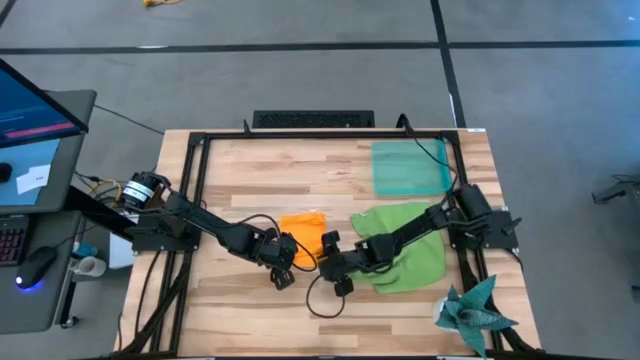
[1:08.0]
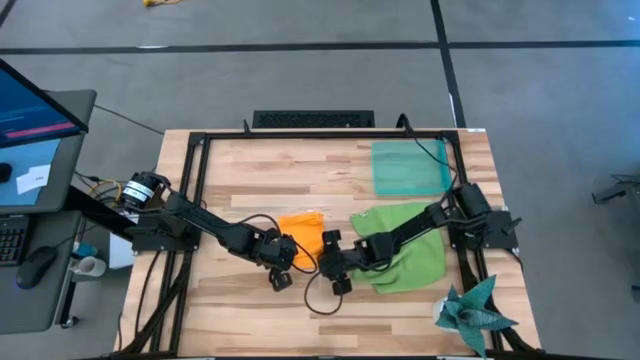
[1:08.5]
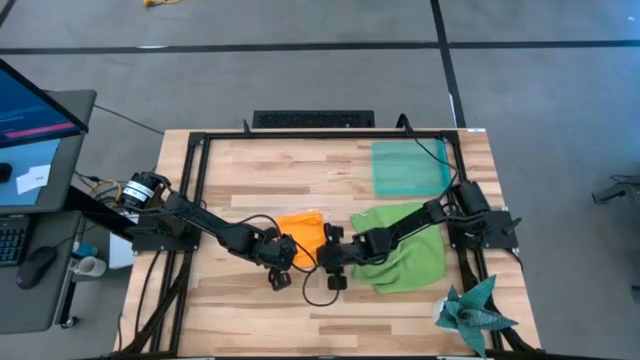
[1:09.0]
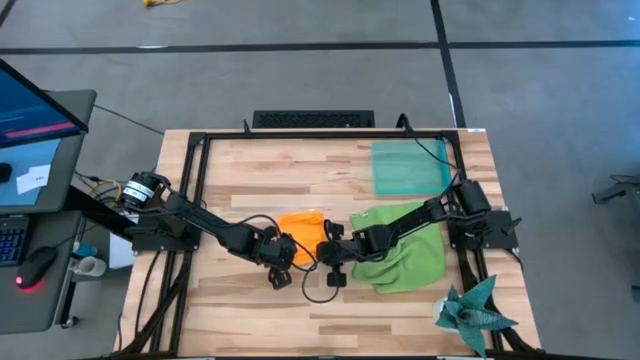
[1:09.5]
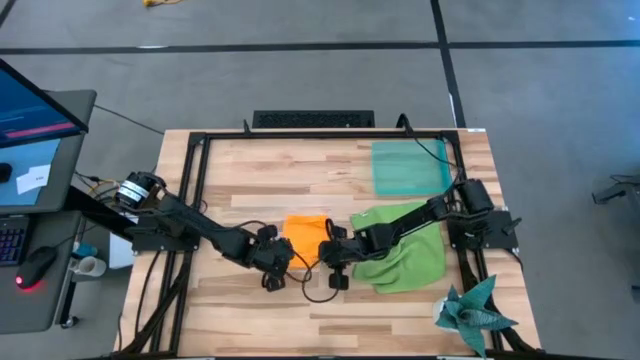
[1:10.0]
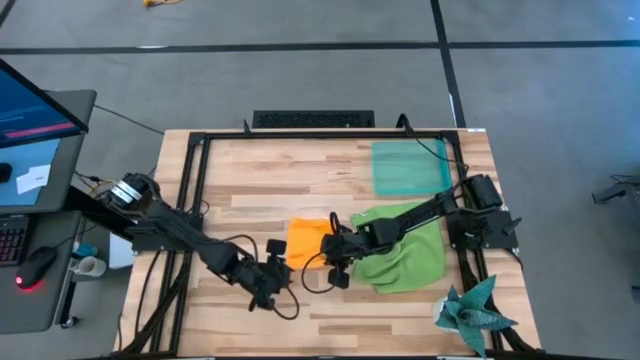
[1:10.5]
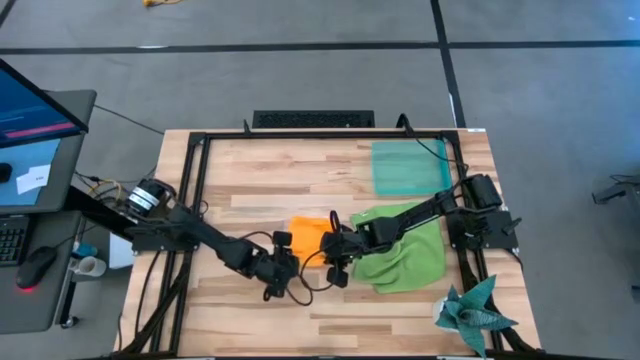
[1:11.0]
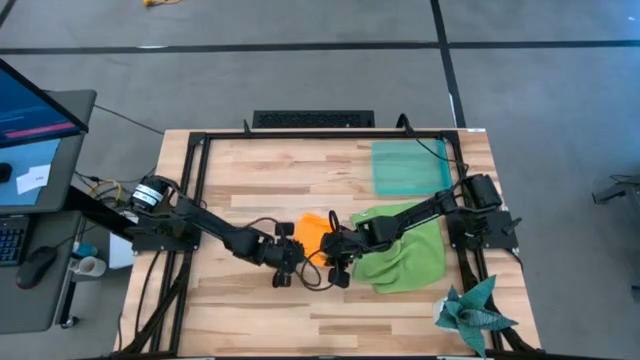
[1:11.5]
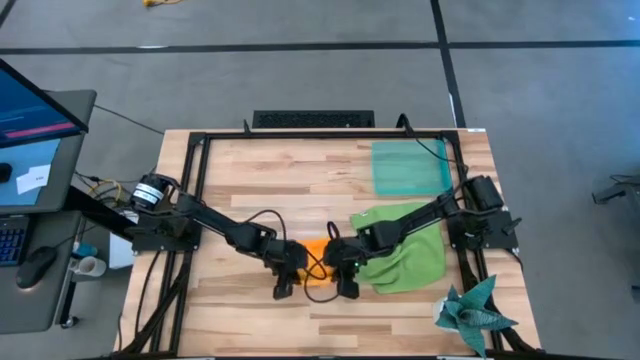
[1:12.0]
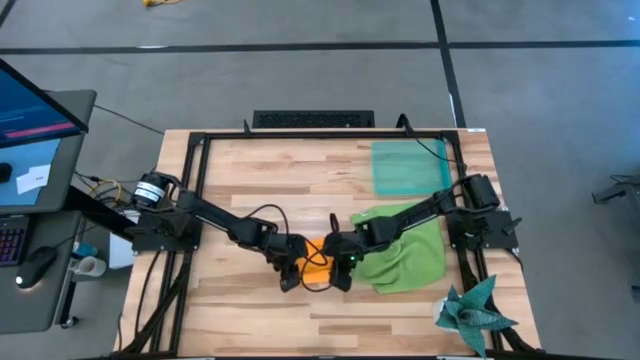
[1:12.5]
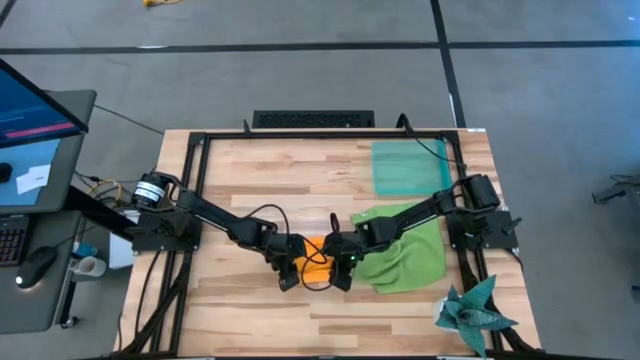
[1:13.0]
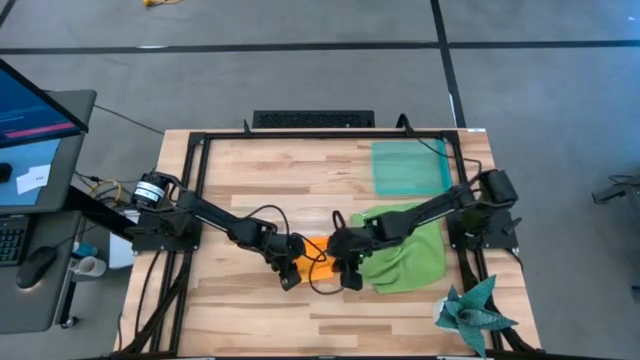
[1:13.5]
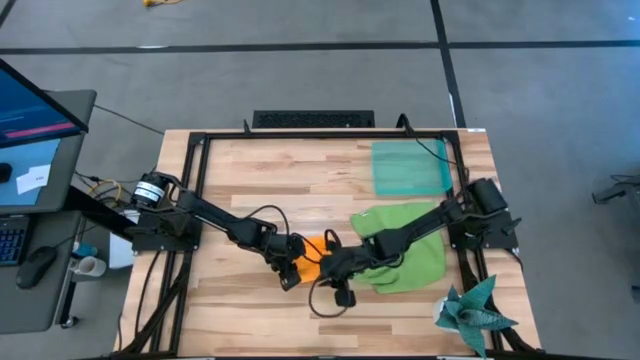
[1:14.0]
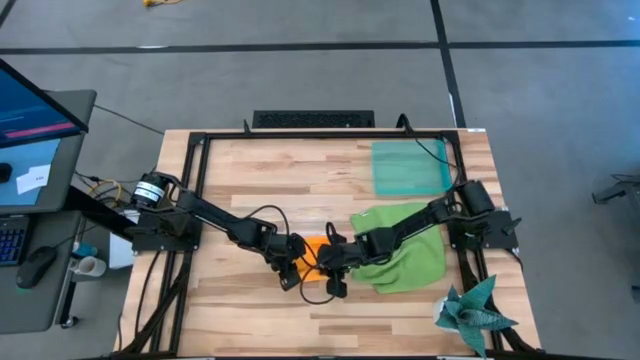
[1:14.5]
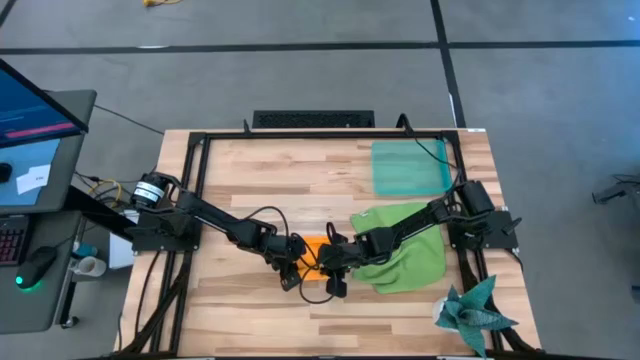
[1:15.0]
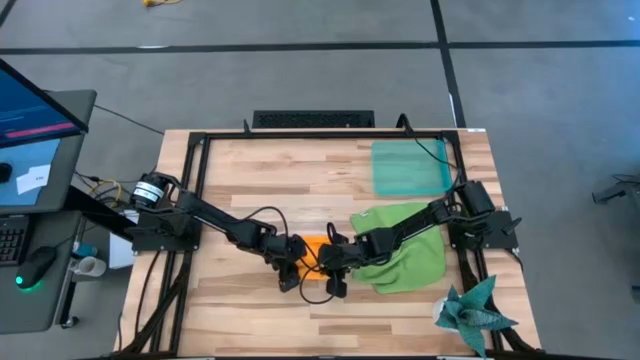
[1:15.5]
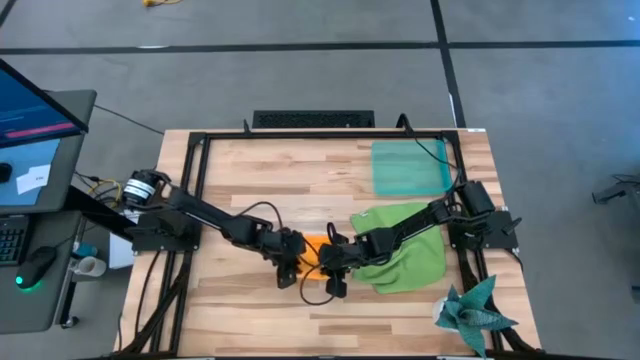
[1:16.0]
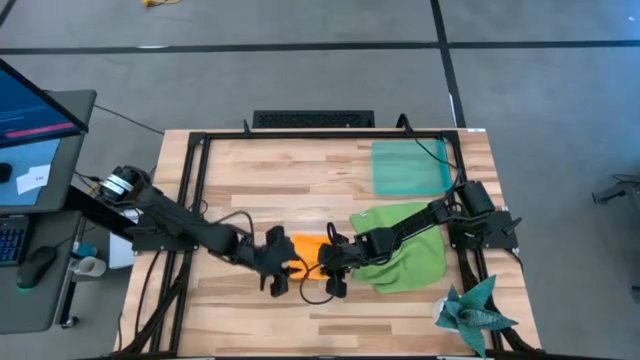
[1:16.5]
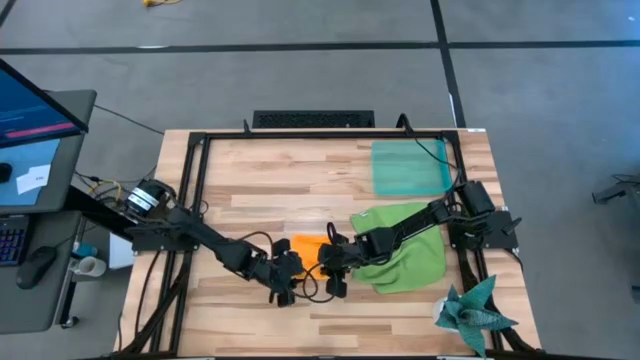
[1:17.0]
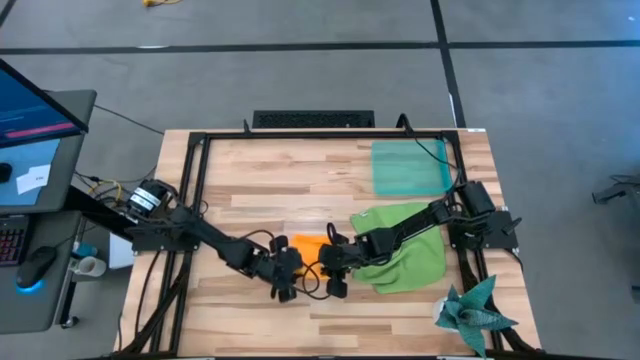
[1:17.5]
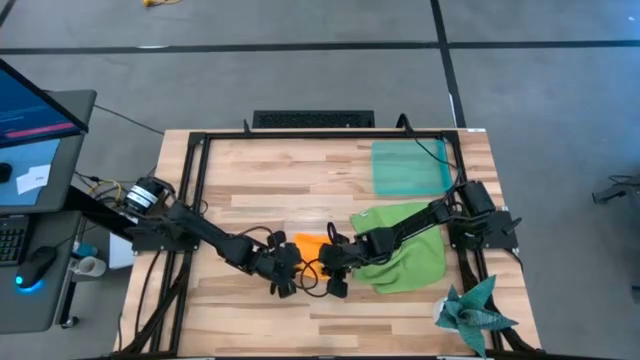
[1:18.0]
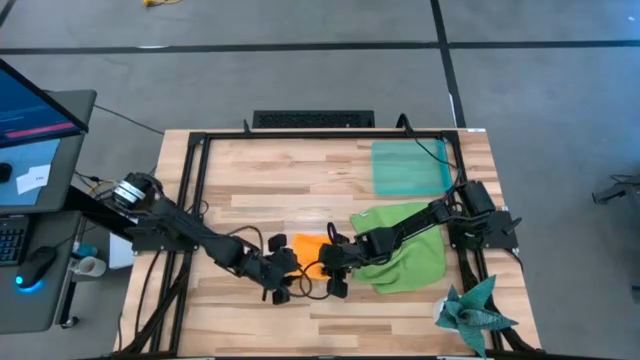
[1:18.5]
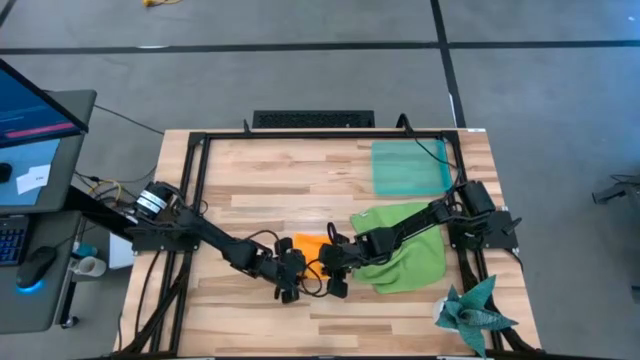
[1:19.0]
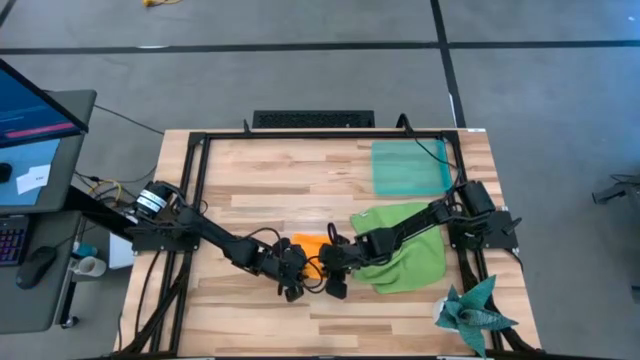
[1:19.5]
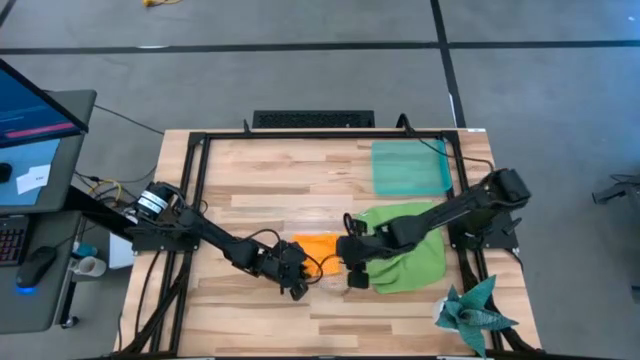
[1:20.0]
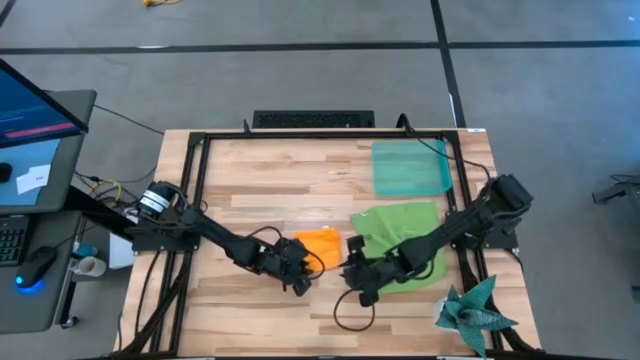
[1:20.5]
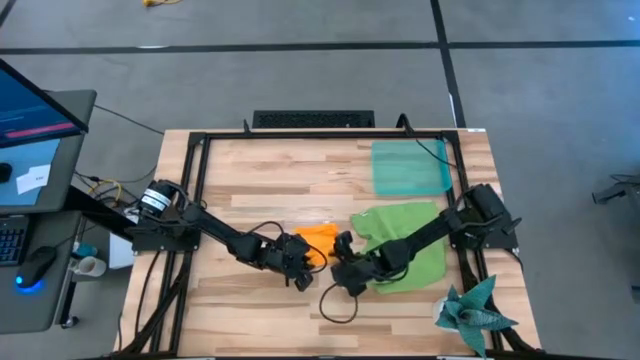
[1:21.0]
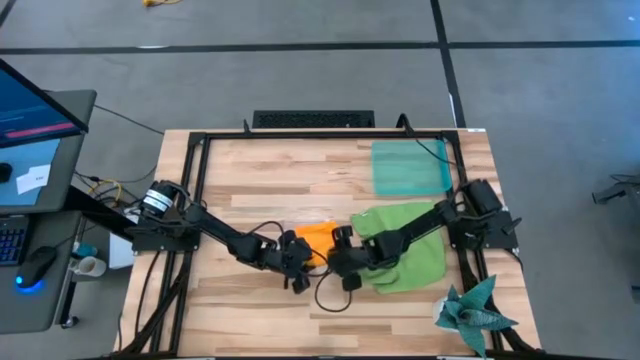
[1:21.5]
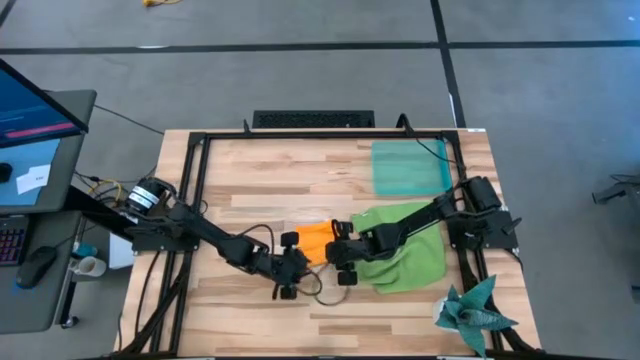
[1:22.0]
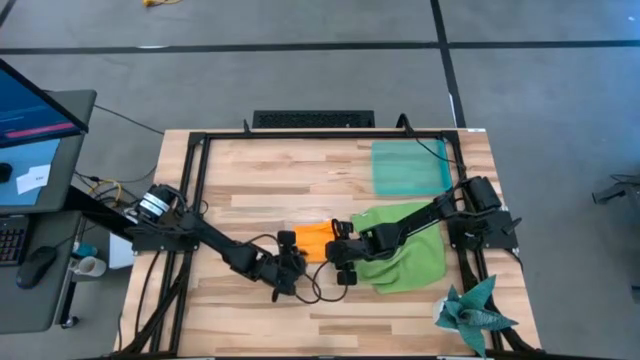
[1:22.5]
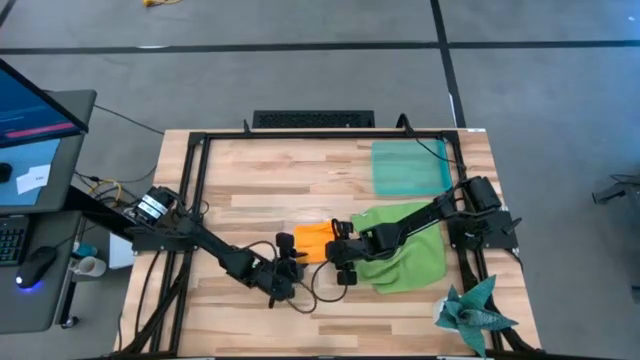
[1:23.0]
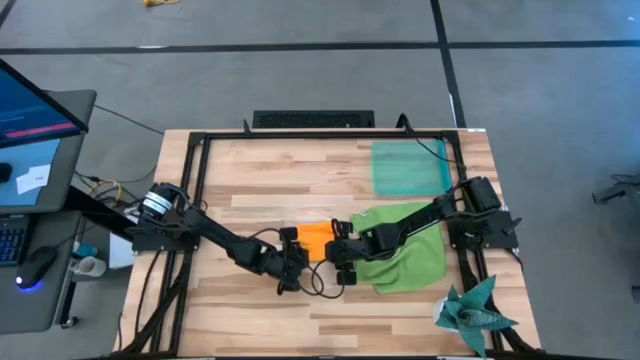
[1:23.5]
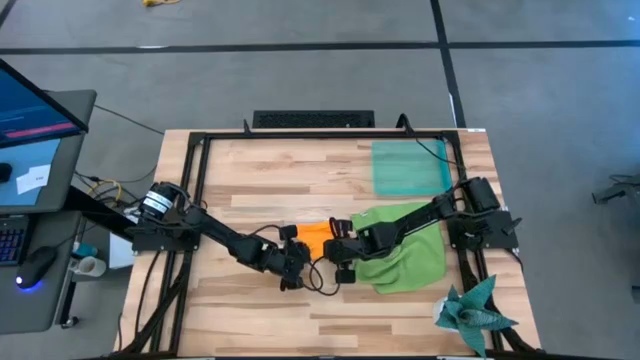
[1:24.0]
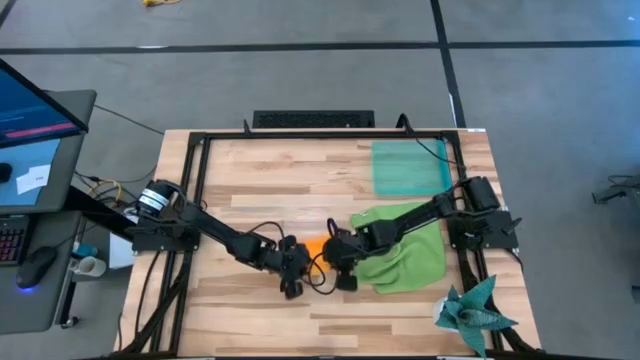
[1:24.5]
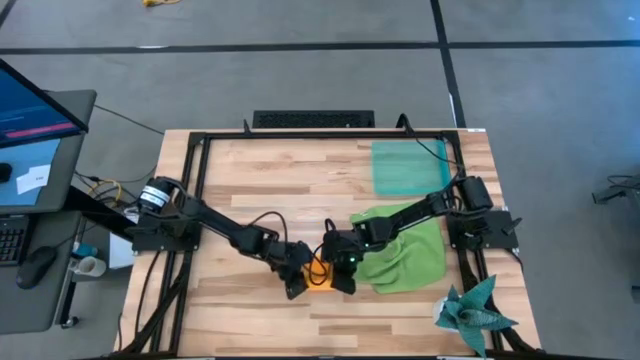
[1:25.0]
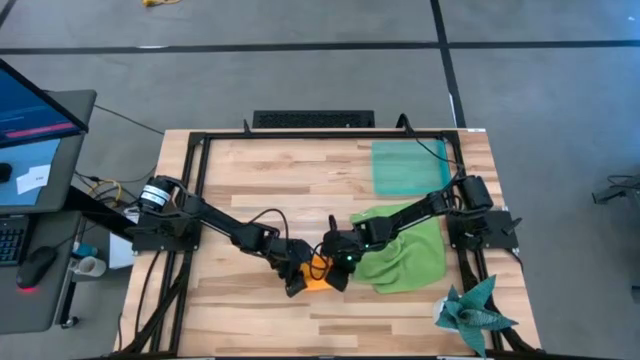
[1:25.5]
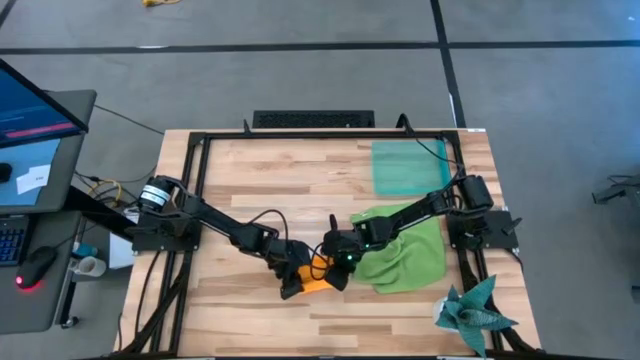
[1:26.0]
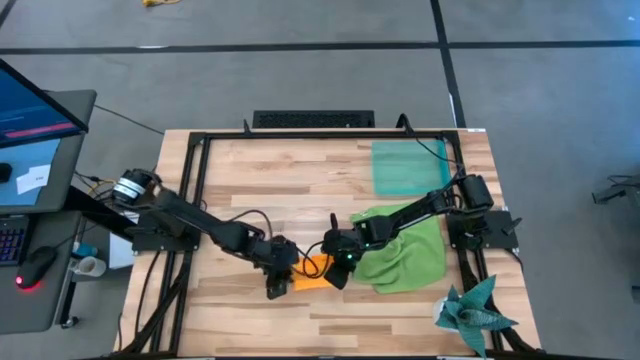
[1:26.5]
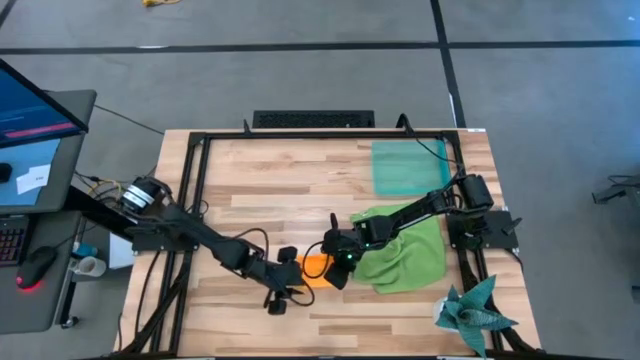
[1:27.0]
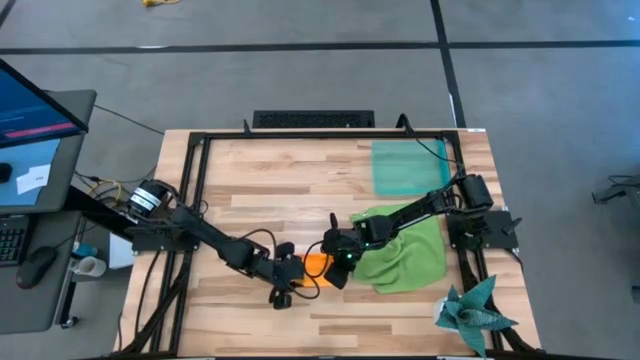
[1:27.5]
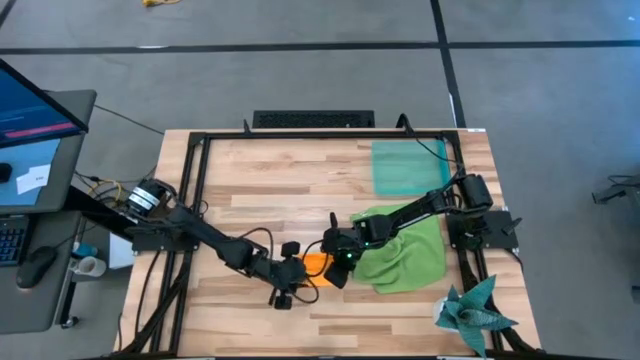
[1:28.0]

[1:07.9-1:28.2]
Task: Roll microfiber towels into tight, uniform cylinder then place into a basket
Roll the orange towel
